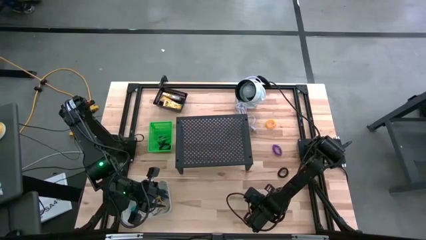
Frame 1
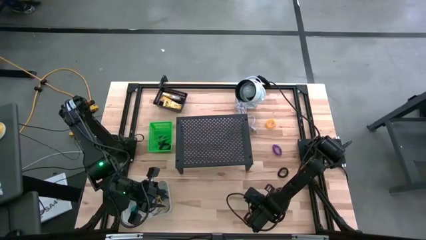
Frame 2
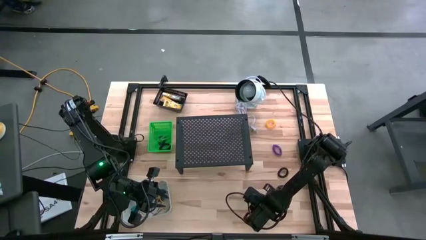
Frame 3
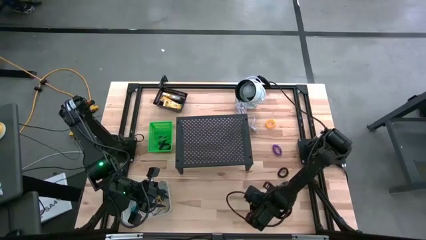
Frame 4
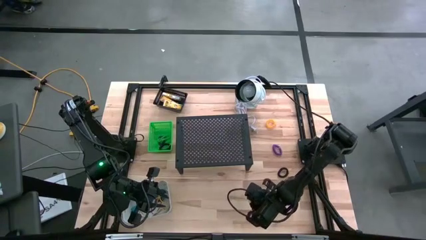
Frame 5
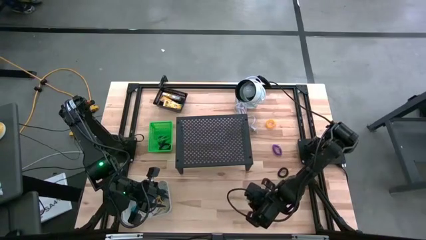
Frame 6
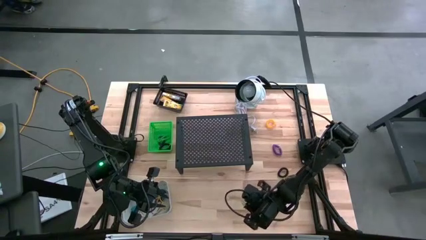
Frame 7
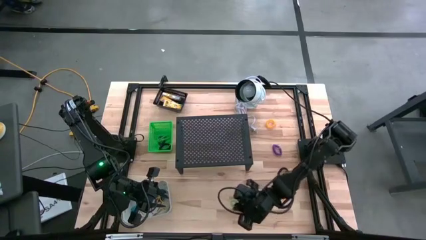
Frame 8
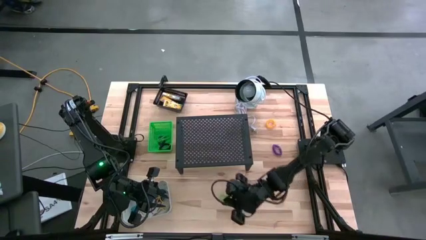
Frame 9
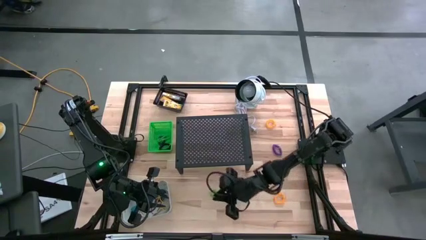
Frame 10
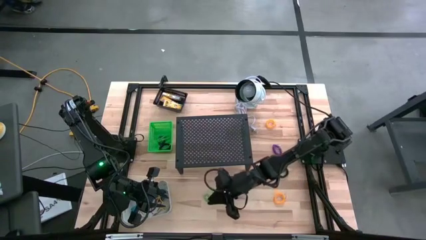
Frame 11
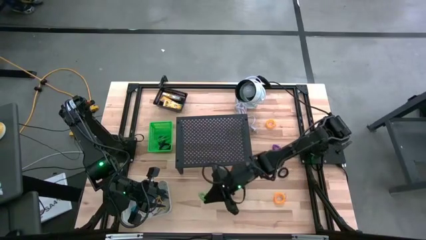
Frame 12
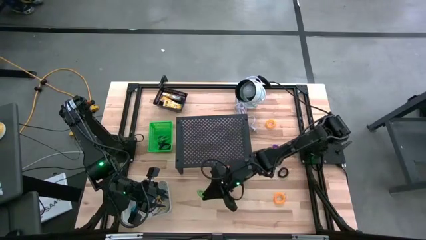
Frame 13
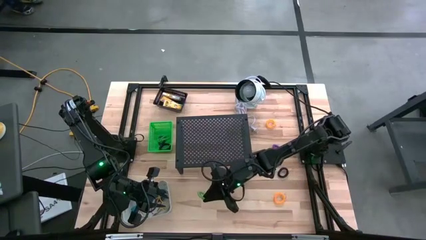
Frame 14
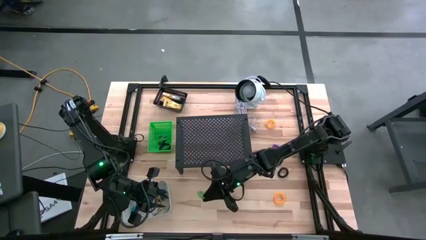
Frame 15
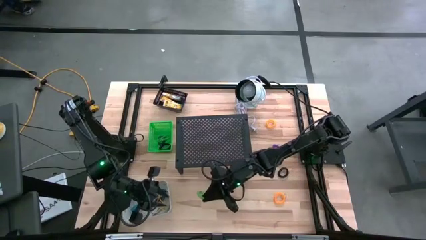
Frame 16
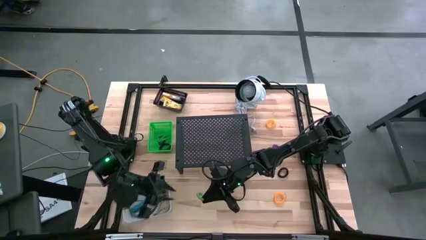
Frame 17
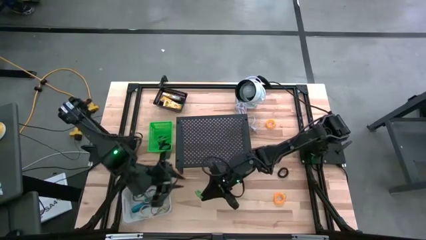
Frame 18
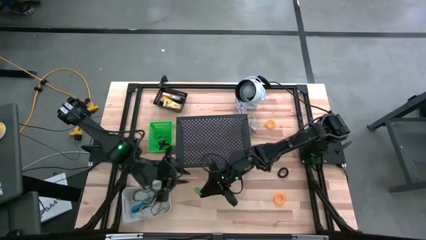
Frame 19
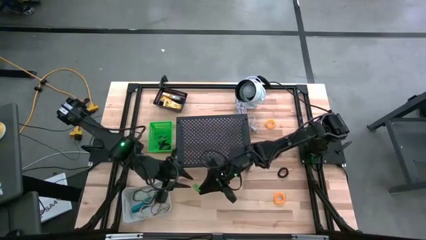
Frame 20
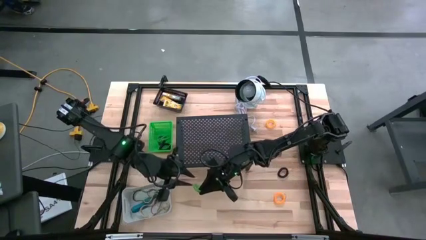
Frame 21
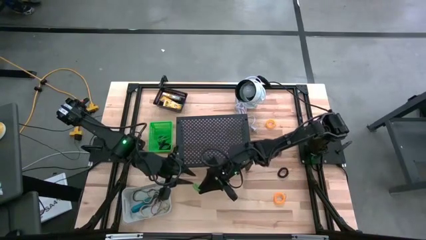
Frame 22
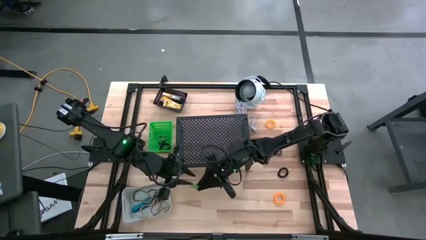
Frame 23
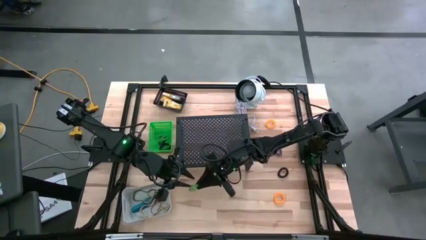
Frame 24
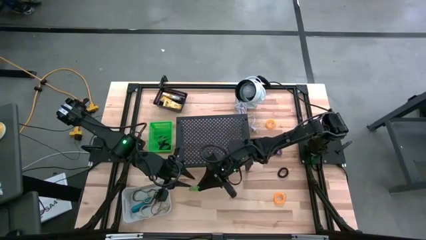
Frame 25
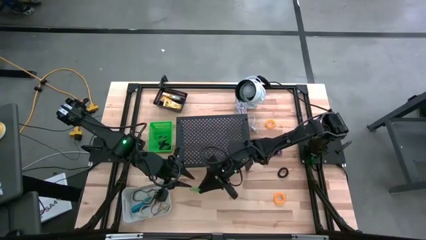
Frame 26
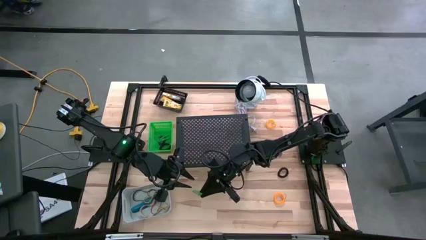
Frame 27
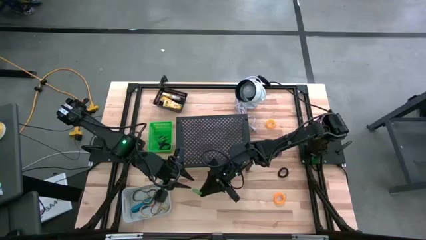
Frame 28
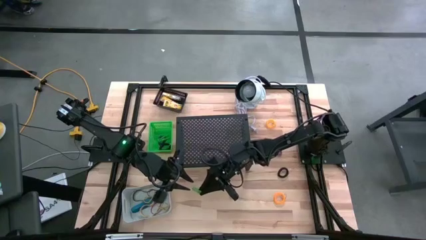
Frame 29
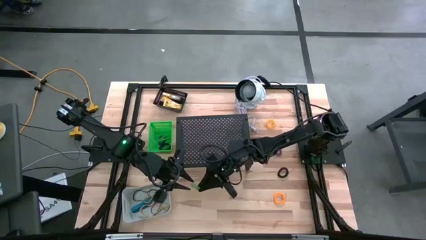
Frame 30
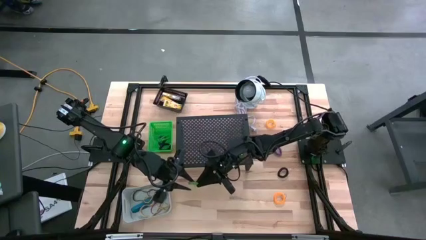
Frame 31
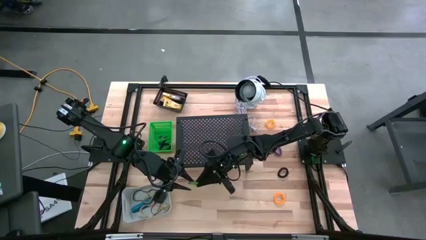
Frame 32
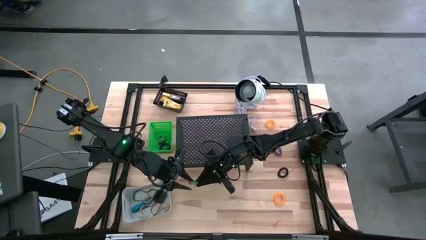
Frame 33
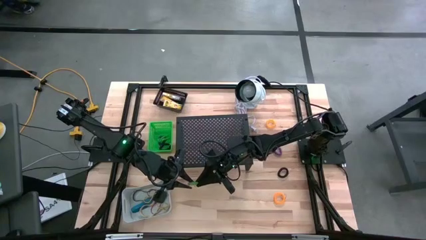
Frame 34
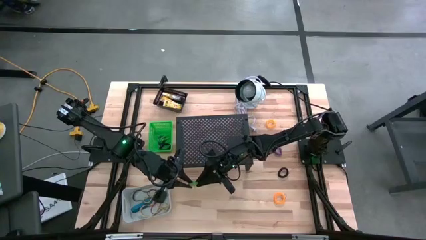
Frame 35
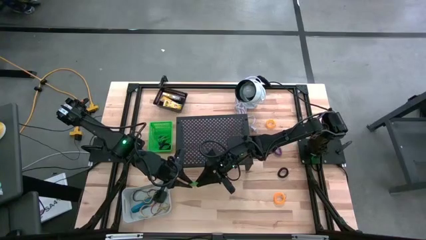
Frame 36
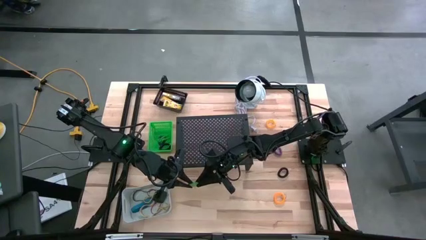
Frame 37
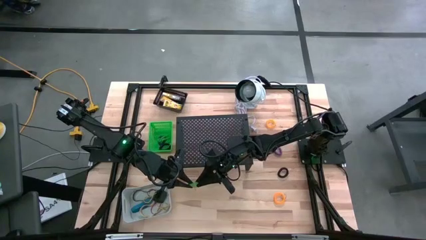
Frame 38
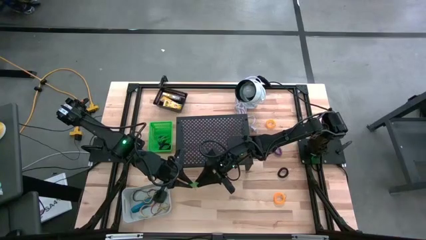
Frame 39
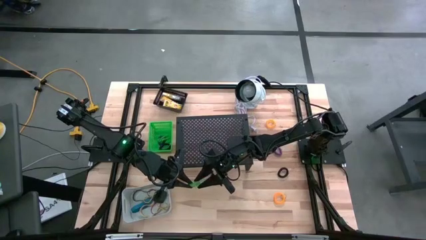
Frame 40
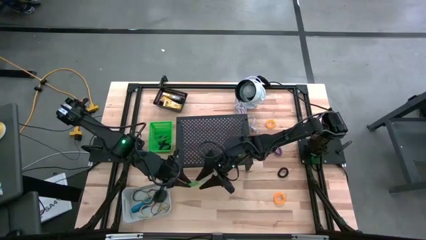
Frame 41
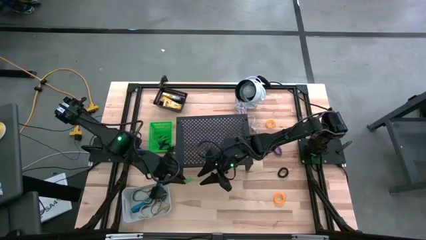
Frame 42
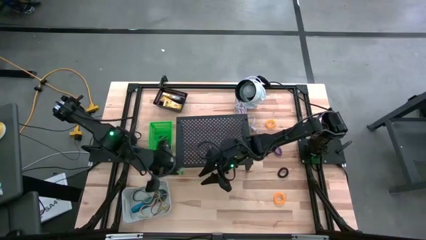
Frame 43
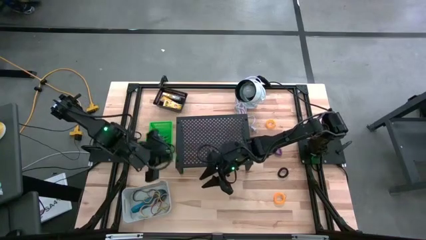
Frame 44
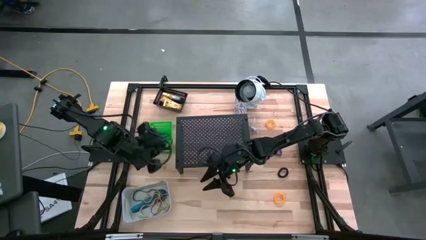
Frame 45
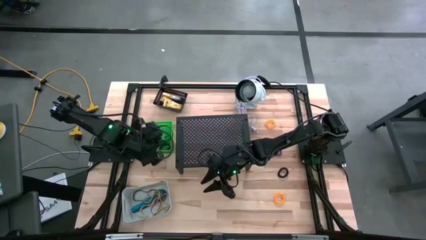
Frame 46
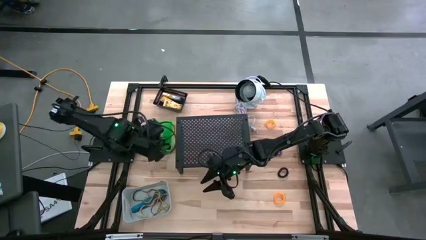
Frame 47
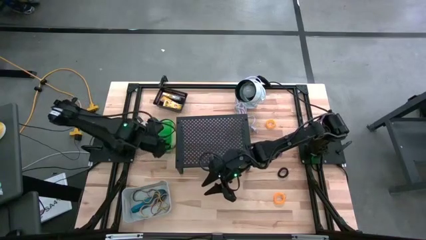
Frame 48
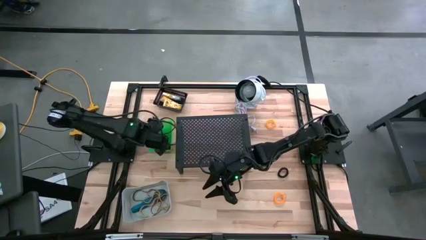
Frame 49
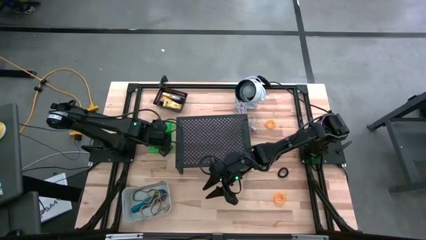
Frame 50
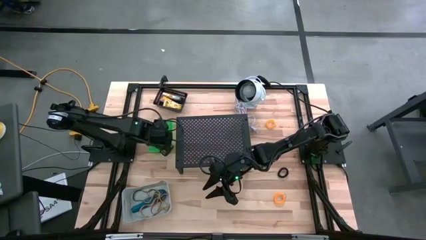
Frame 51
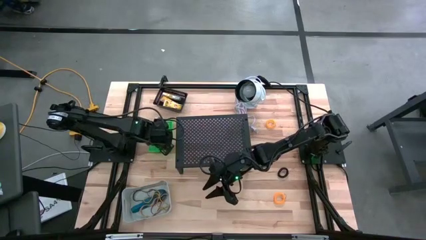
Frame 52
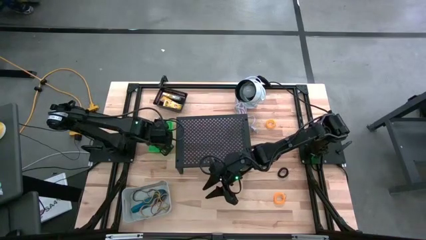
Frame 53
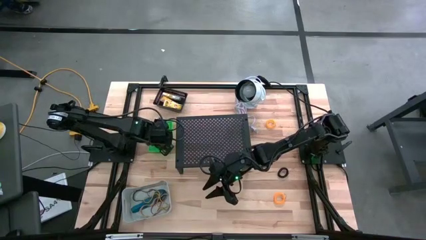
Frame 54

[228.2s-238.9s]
Task: Pick & Place Office Desk Supplies
Put the green spring keychain into the green bin

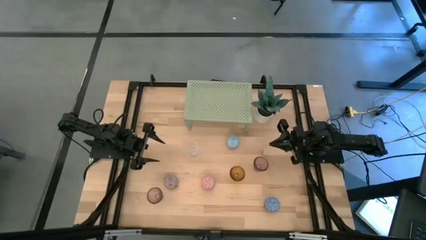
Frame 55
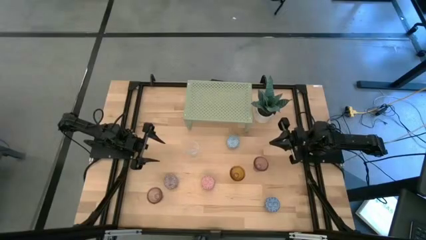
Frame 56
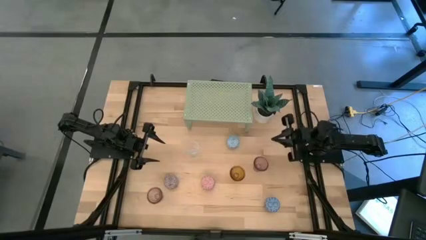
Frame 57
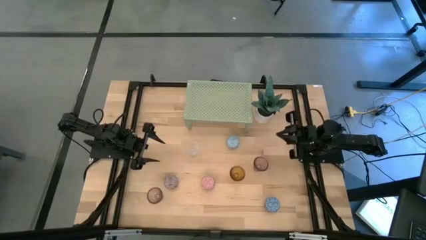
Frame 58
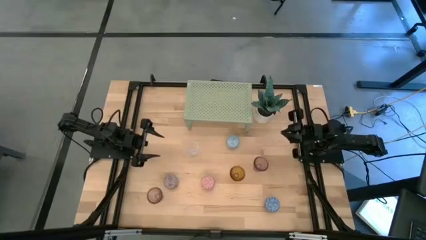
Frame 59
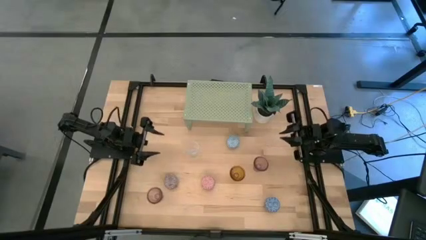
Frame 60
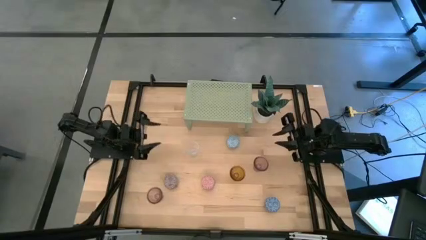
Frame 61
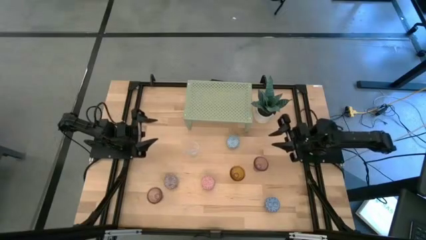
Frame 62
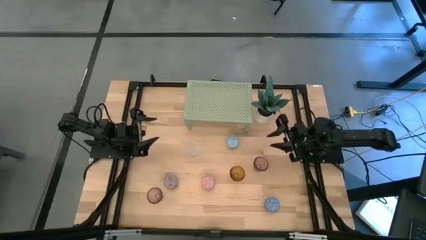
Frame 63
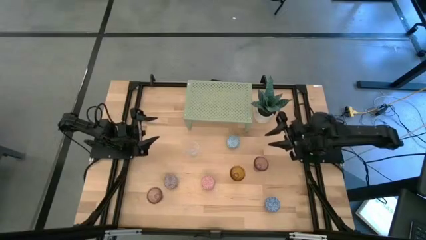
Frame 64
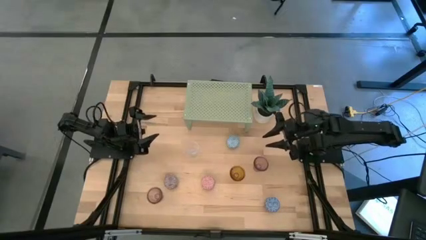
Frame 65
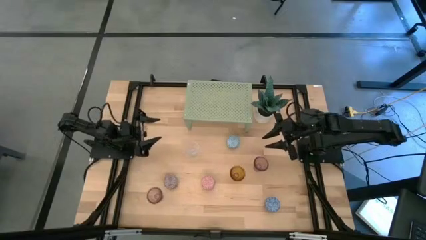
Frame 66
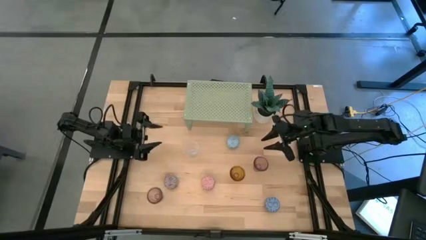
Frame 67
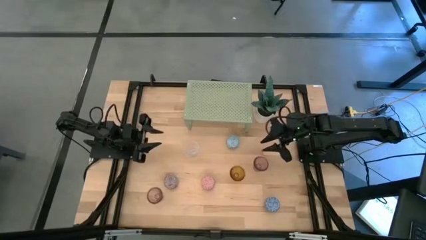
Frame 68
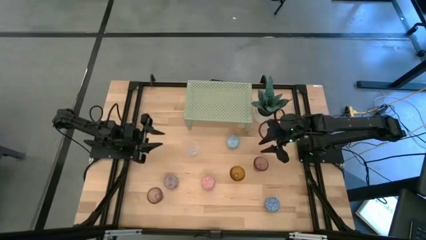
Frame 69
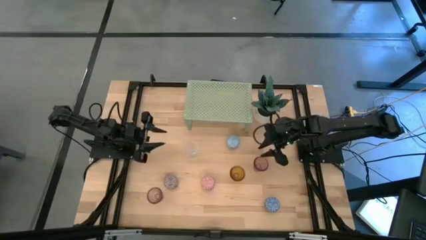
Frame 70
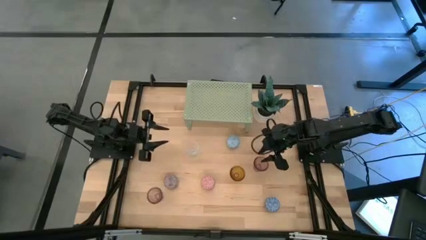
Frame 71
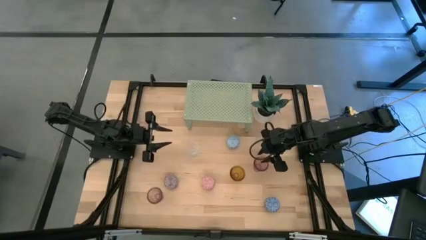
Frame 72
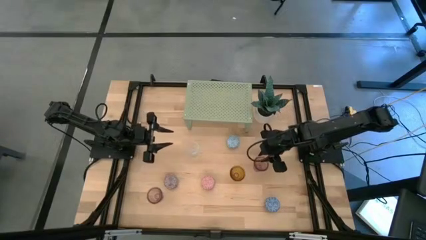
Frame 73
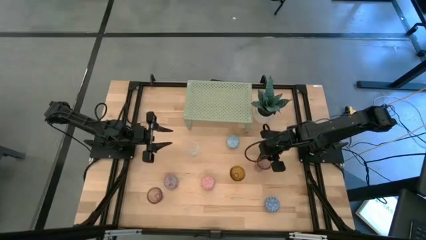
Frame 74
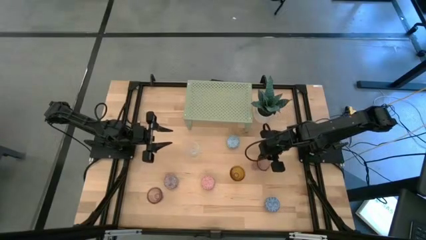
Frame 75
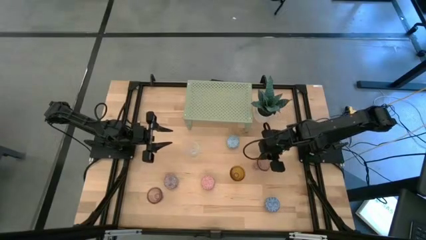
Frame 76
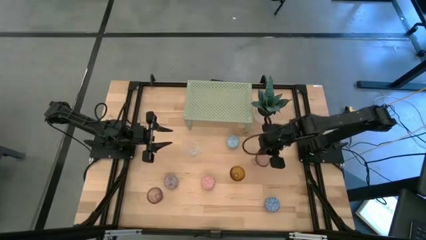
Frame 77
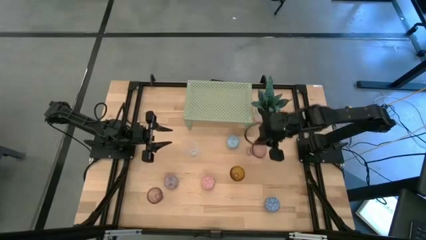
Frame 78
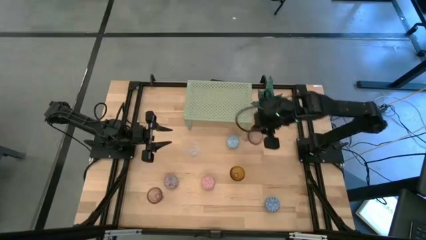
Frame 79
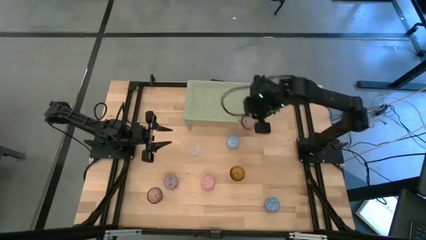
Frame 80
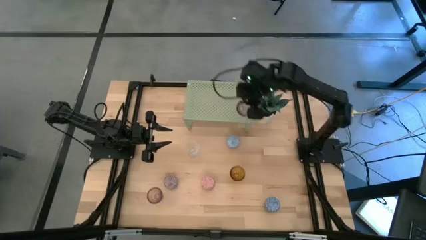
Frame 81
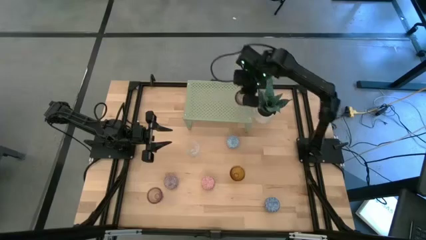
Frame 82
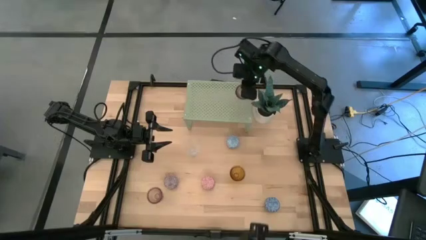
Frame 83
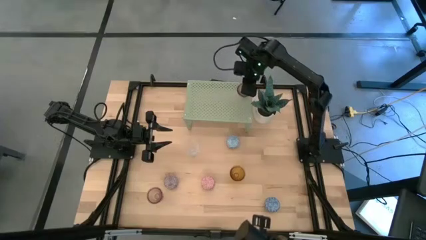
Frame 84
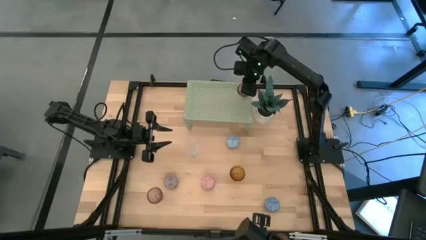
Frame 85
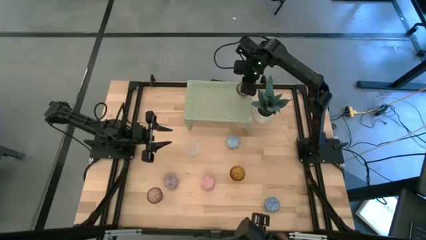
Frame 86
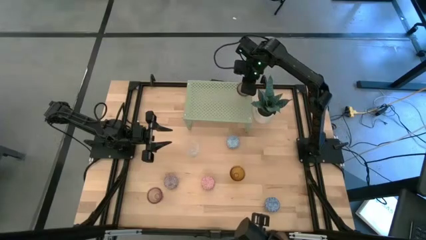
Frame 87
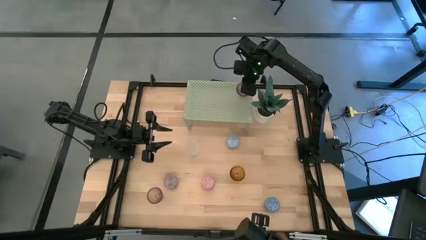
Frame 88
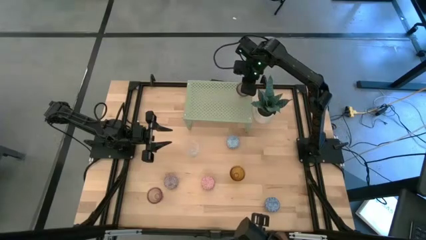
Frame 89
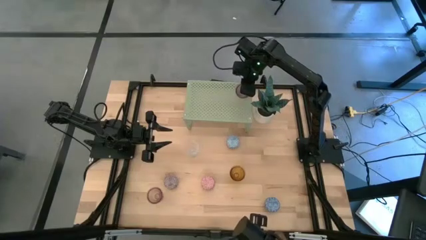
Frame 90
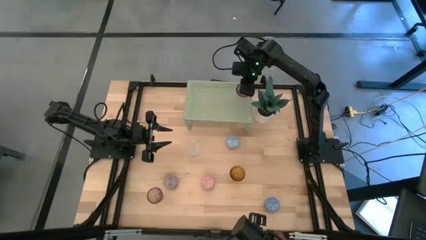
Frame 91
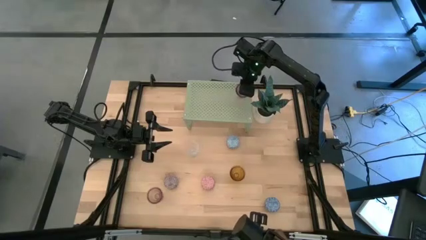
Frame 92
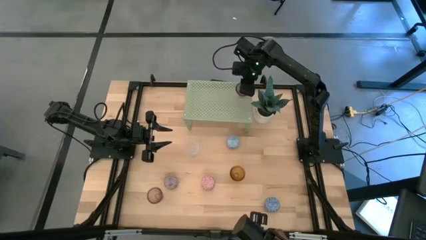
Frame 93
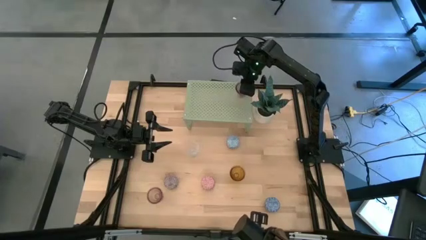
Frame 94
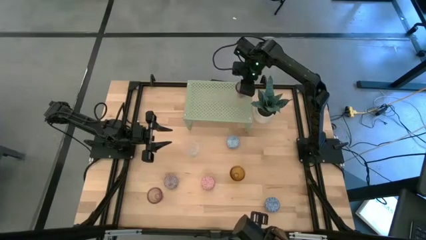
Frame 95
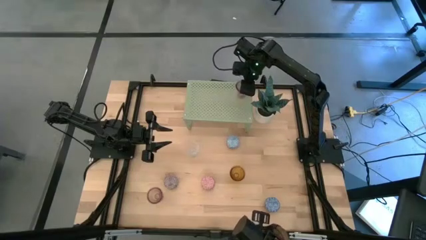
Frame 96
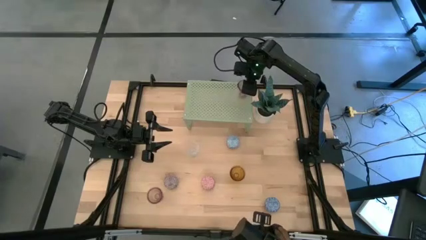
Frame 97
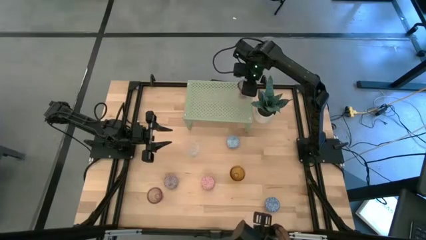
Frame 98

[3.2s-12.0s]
Task: Pick & Place candle stick holders
Put the purple glass candle holder on the shelf
